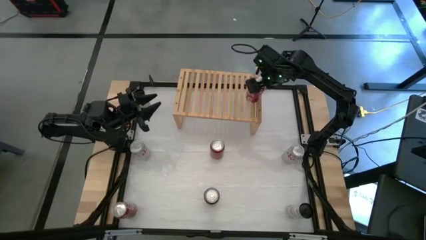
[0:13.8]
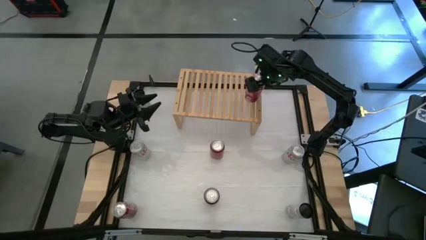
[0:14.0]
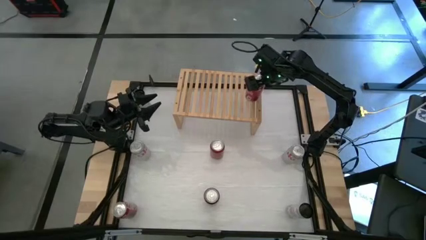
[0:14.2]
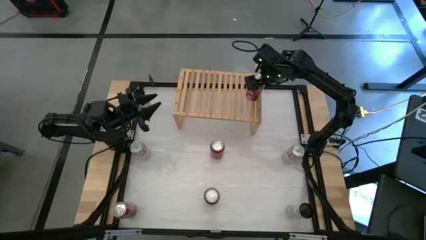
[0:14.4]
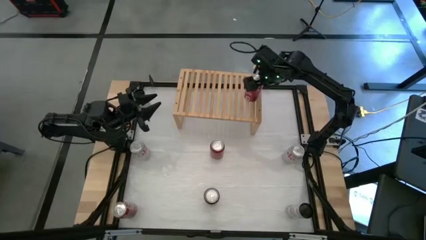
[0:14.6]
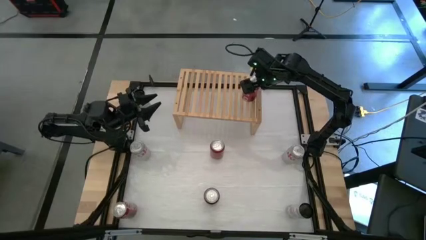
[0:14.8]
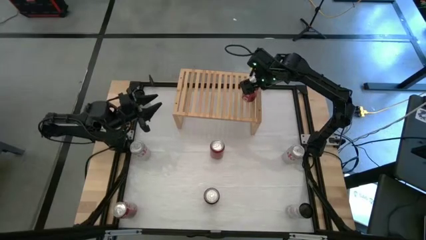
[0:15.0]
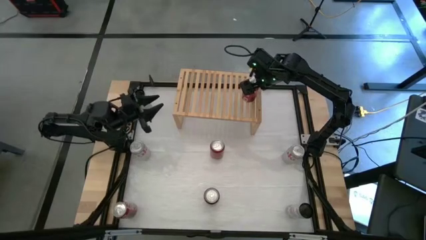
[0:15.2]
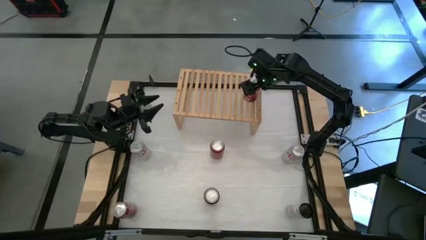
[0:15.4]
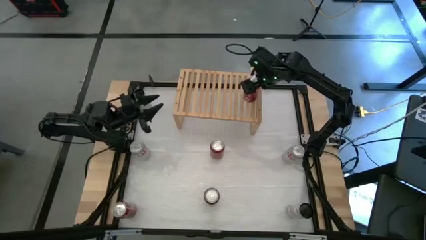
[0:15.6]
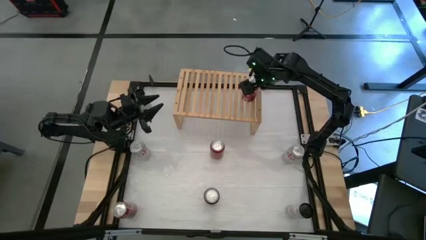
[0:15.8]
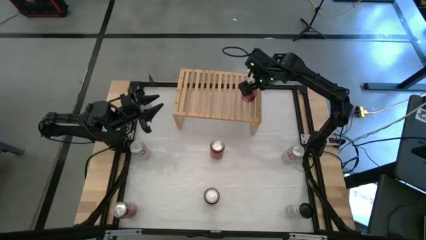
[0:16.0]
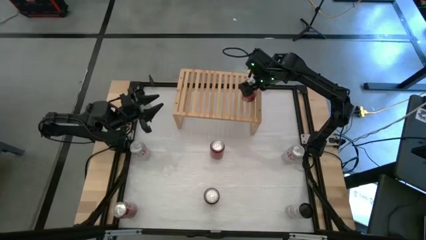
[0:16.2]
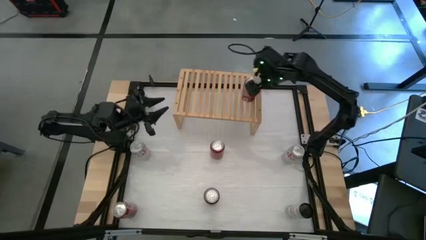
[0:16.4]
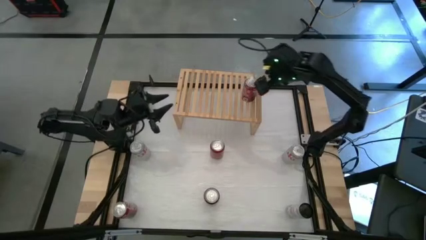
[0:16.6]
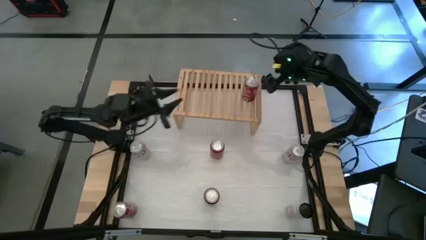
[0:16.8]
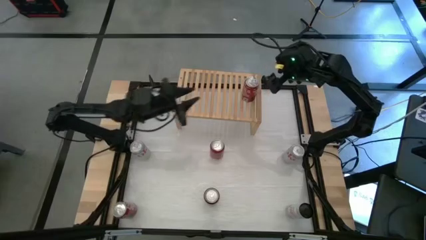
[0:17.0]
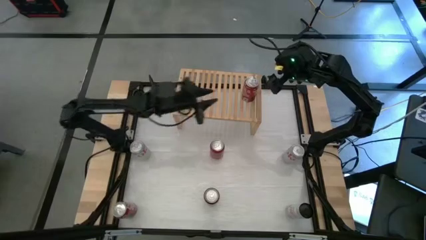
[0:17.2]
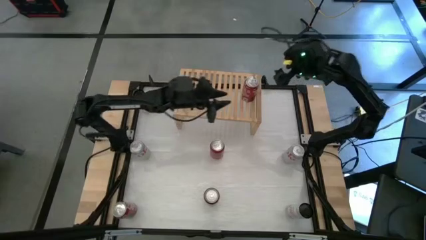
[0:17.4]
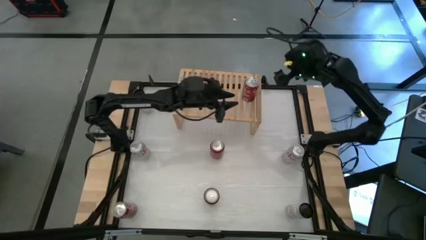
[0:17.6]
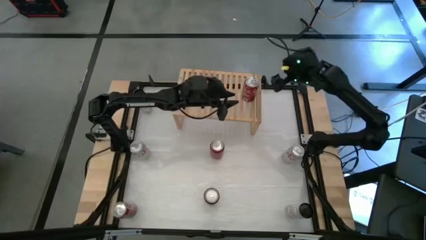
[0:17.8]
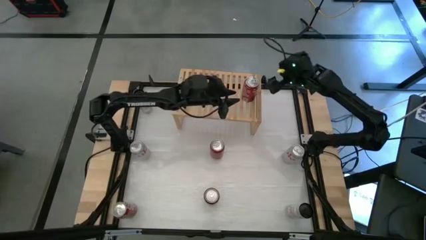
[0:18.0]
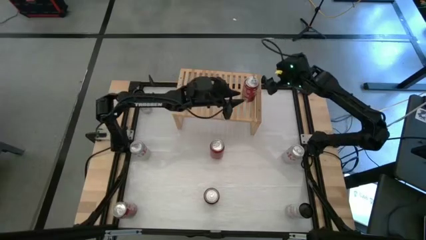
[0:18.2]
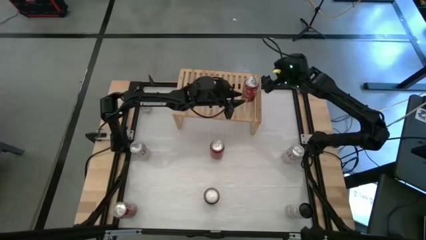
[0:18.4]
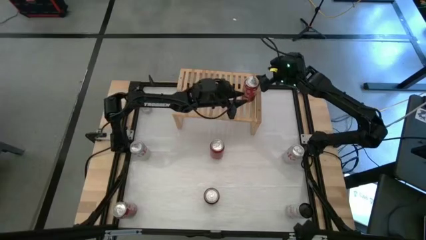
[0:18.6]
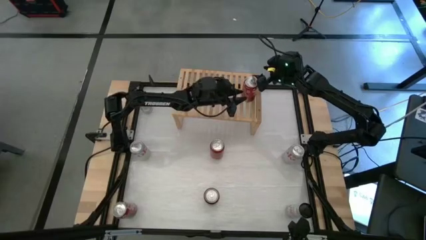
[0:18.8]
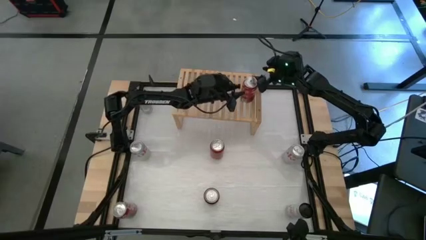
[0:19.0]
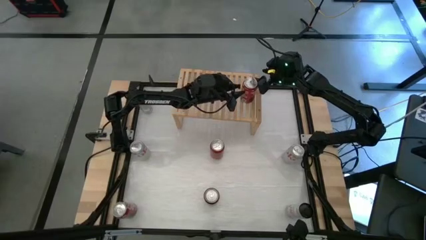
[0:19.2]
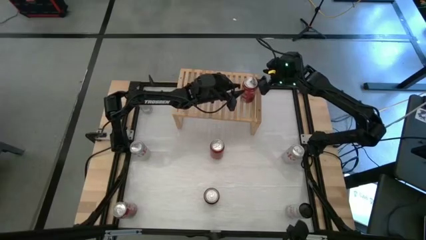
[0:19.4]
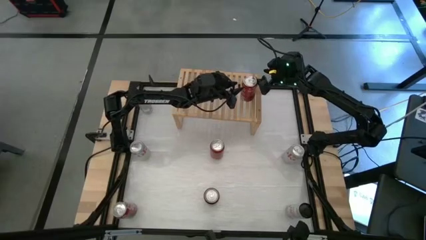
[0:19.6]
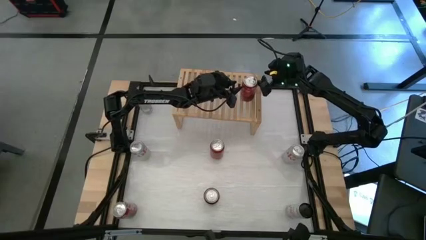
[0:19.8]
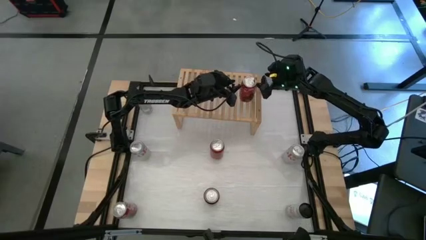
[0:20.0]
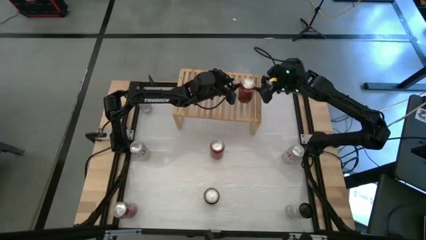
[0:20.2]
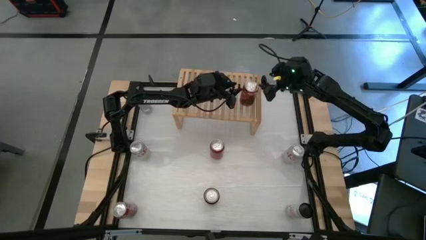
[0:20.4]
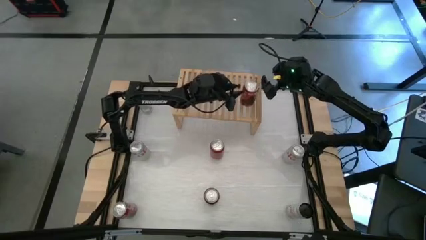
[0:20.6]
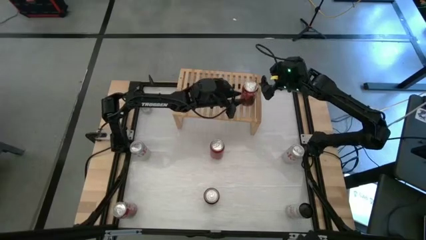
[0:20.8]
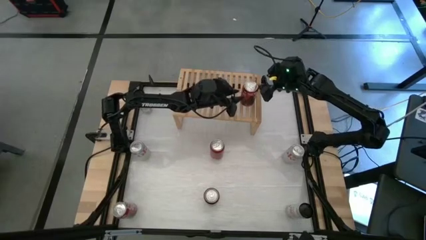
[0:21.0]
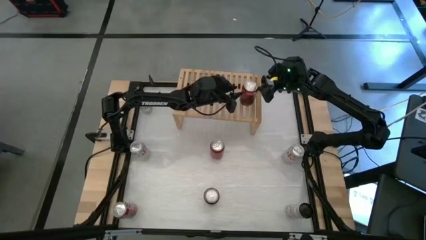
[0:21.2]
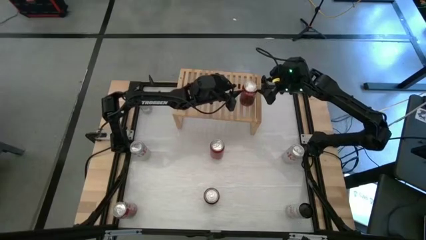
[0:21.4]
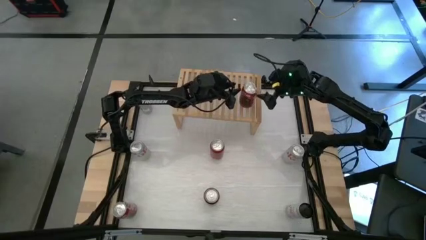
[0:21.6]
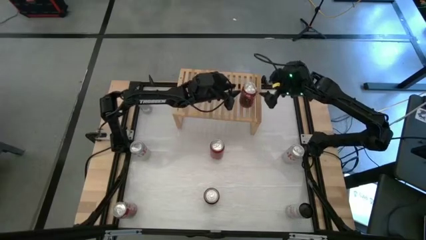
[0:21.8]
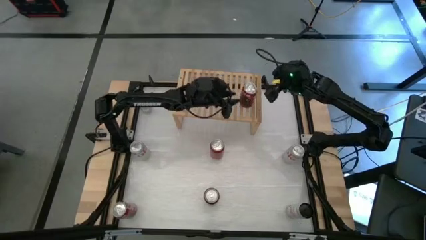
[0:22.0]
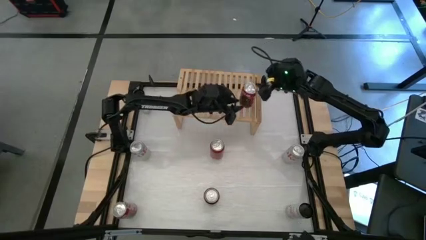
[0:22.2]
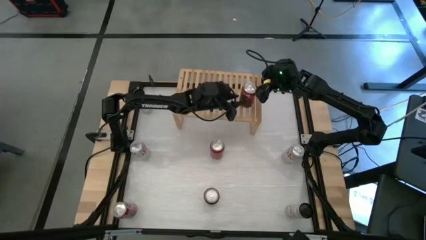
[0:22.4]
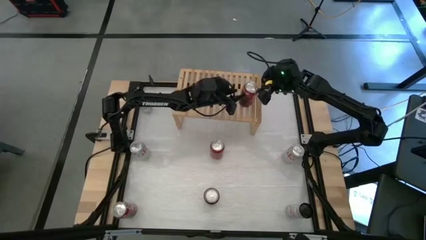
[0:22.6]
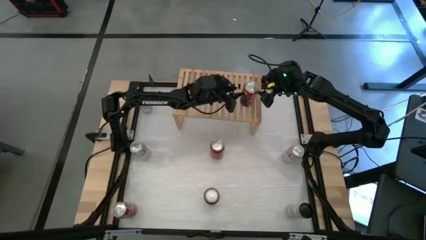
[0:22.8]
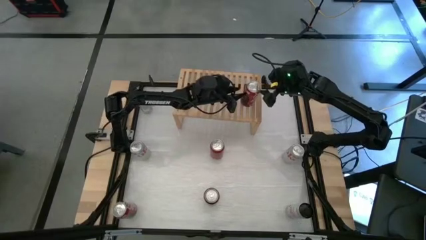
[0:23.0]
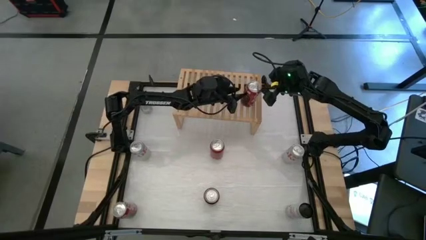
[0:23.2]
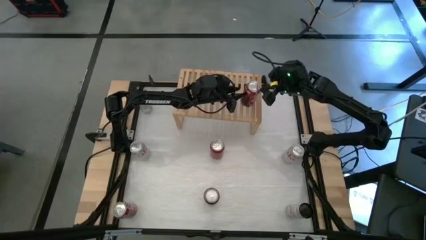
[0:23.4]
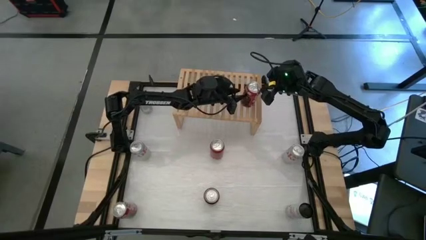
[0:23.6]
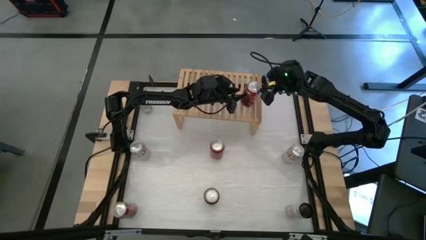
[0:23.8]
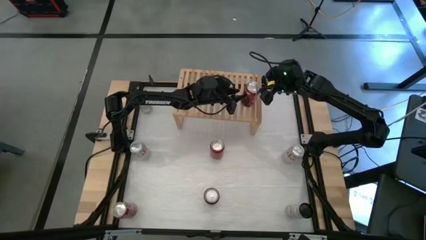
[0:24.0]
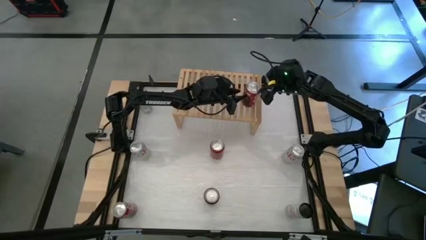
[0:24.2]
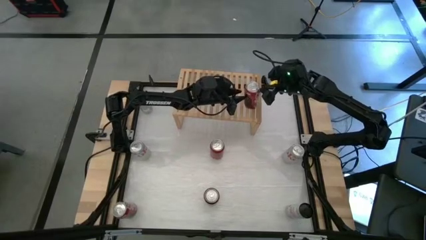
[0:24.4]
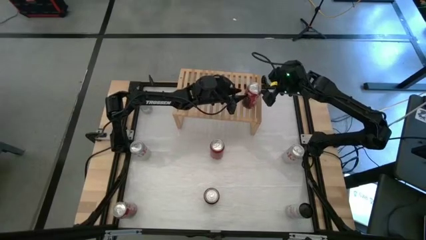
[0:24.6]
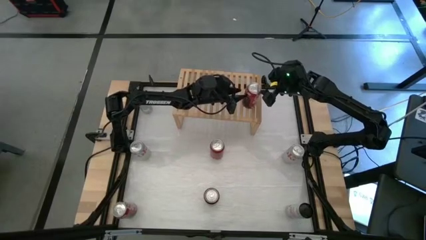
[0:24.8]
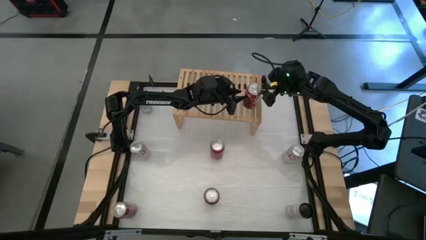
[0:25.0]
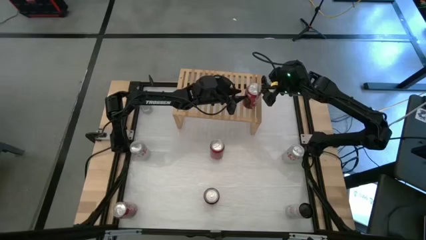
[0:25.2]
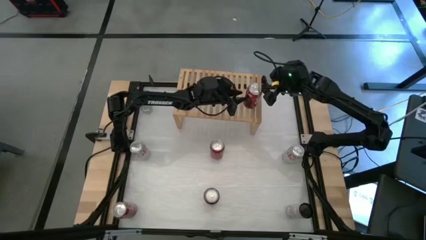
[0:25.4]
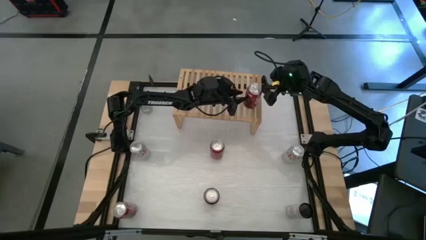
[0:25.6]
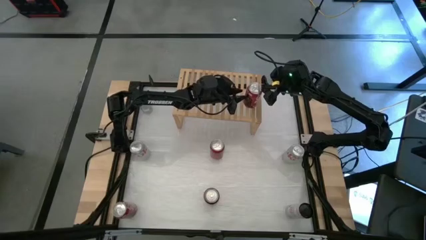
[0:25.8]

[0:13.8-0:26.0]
Task: Place canned beverage on shelf
Put the top red and white soda can on the shelf
